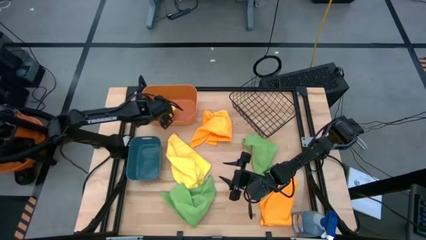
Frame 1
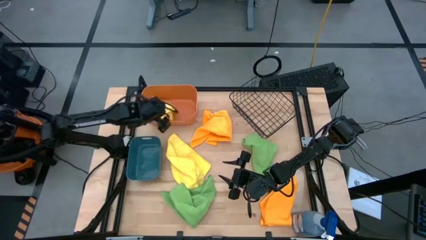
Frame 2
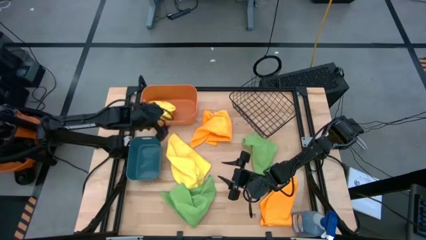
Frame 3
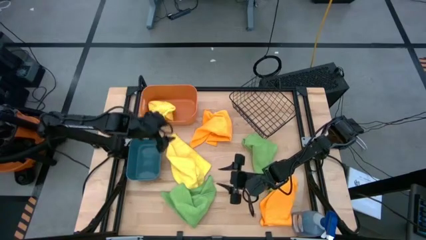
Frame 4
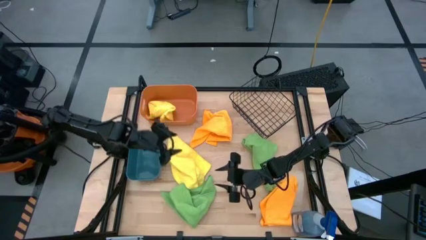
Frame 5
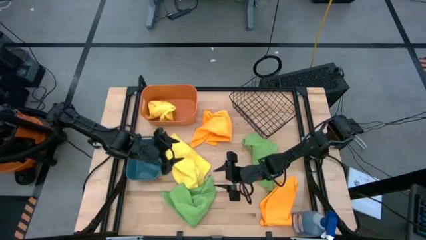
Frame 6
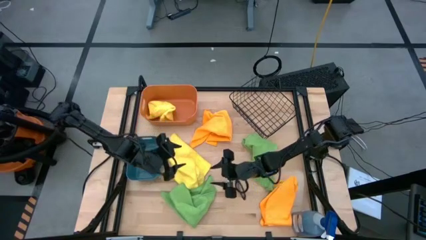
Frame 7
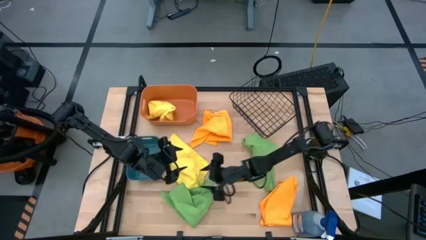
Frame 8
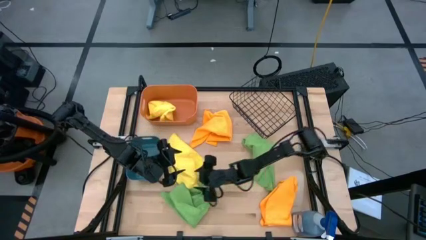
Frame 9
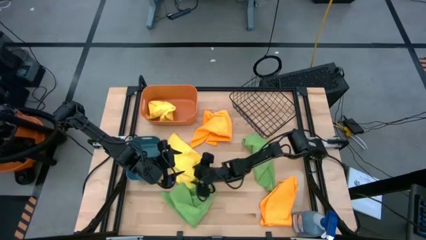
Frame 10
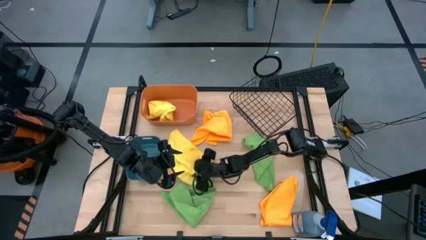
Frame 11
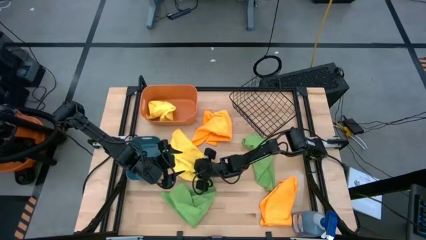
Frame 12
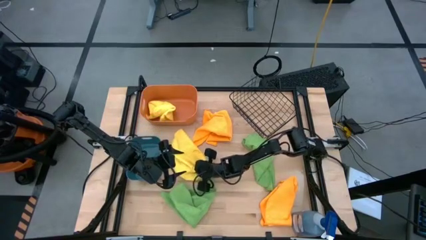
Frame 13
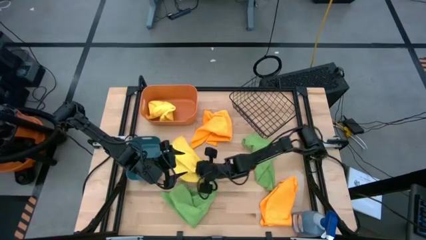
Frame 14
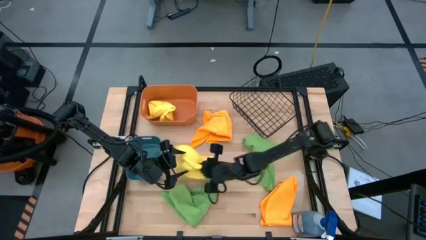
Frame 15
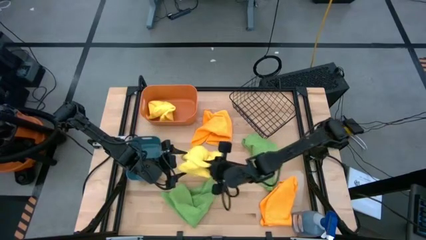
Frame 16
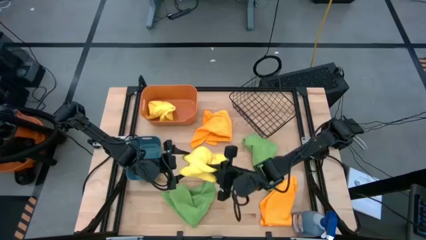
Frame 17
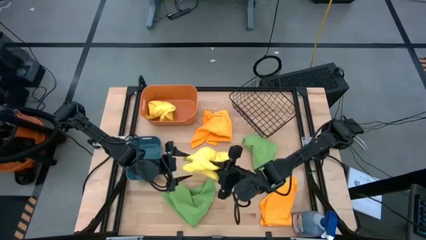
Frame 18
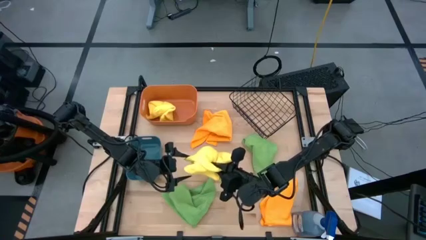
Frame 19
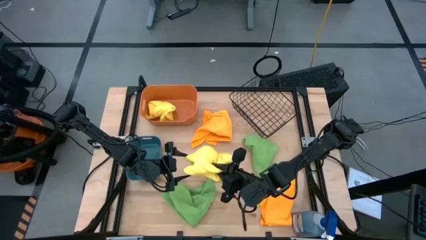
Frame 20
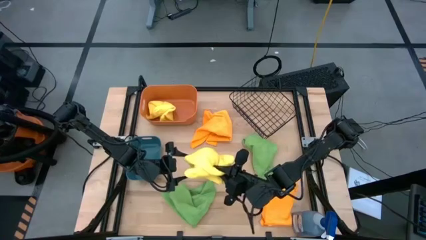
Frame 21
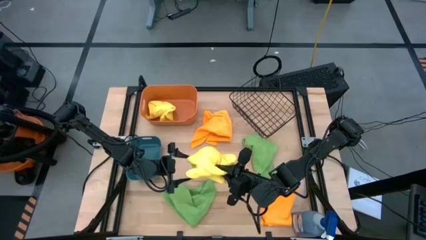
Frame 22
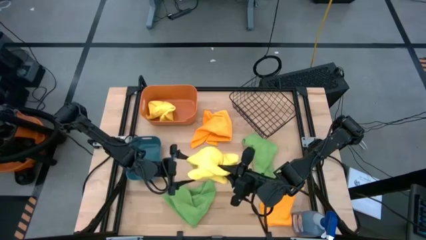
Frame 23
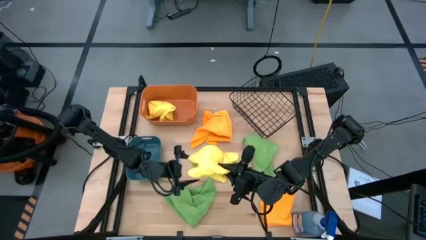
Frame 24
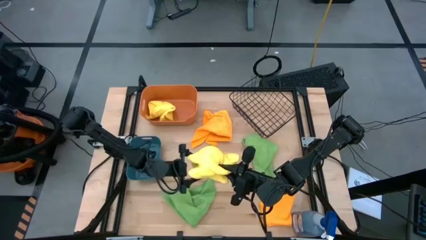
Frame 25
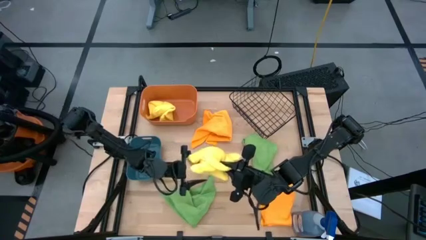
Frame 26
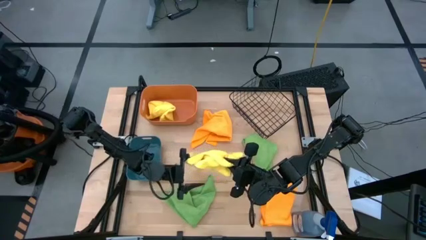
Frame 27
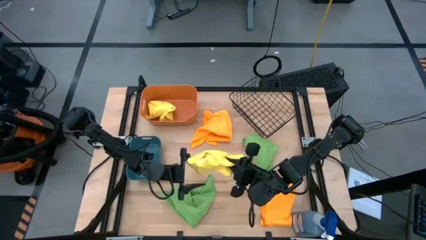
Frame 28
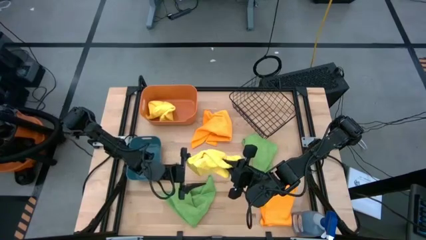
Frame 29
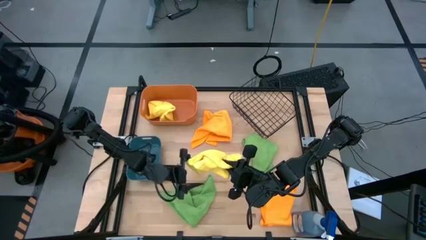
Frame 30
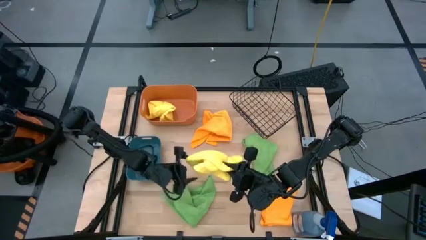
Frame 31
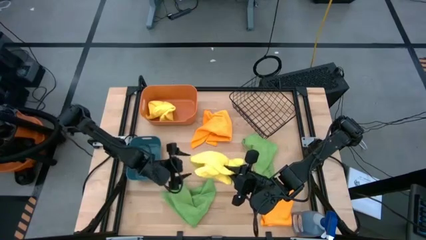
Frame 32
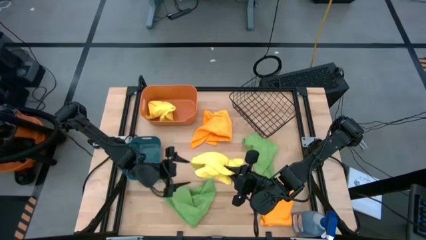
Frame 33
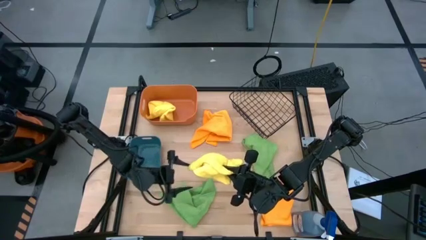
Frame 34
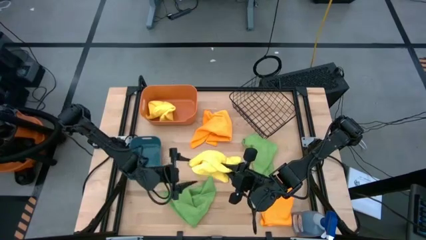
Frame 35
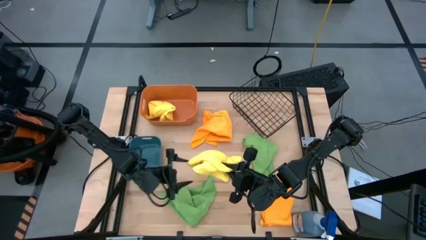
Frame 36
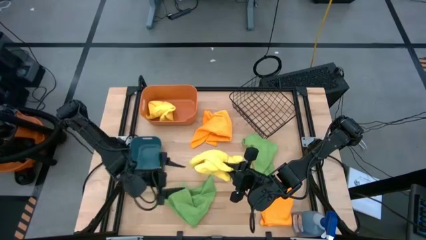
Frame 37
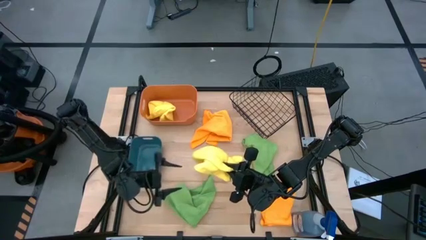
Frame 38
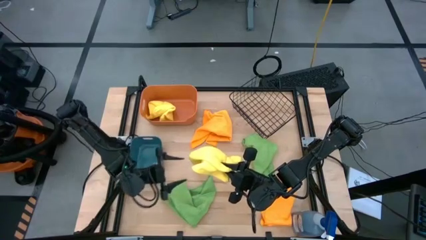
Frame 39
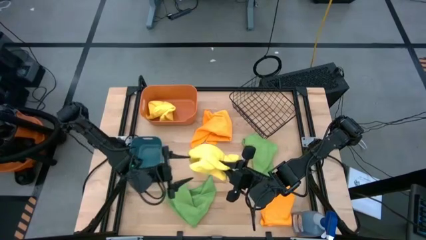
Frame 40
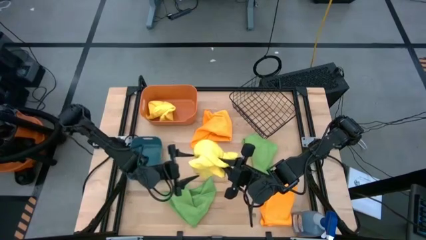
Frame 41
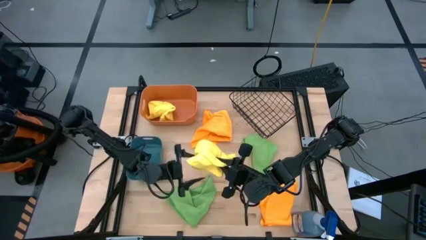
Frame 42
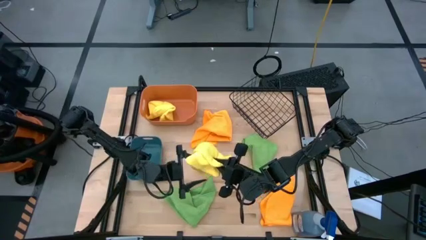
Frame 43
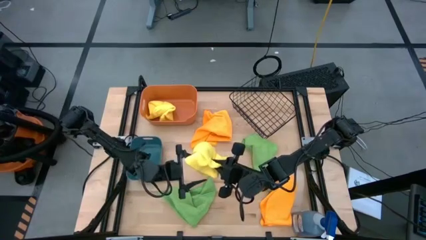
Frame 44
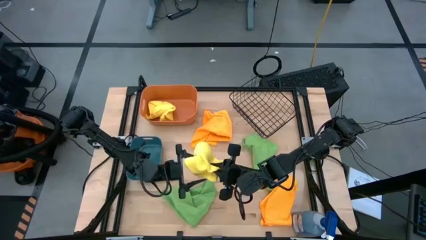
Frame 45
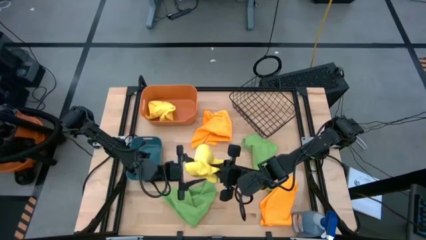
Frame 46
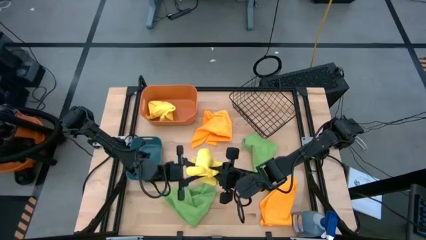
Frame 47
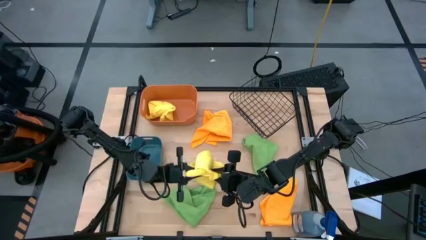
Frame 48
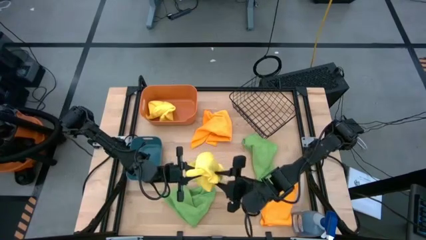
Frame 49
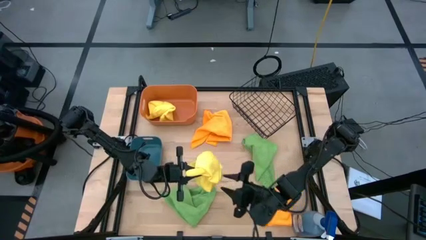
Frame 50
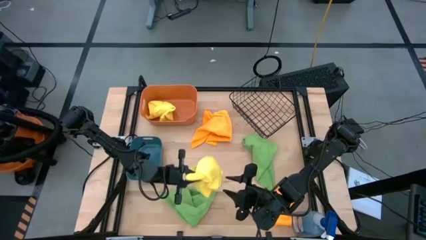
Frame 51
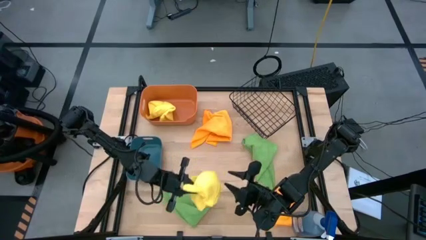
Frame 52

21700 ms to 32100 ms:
Task: Sort microfiber towel by color & place in baskets
Put the yellow microfiber towel into the orange bin
